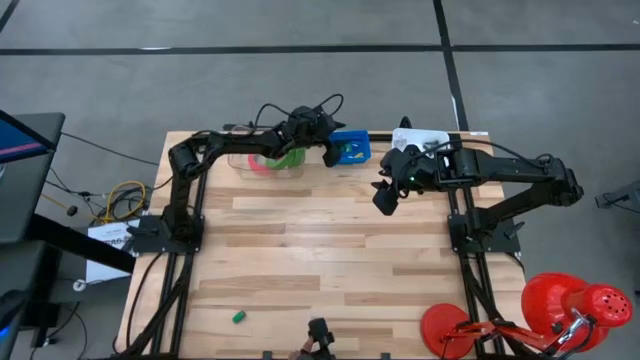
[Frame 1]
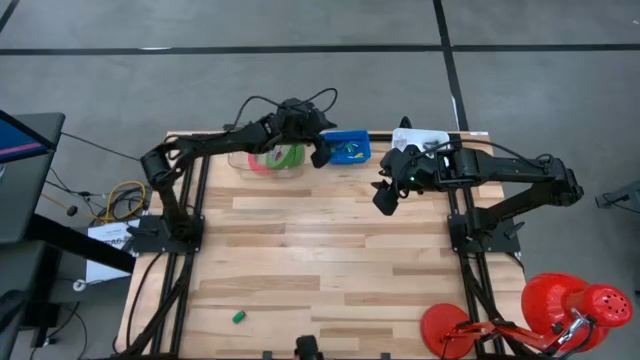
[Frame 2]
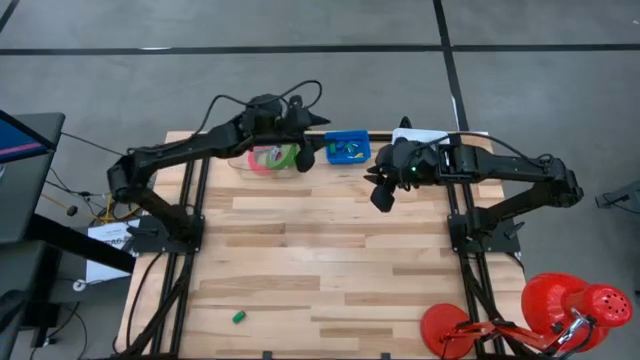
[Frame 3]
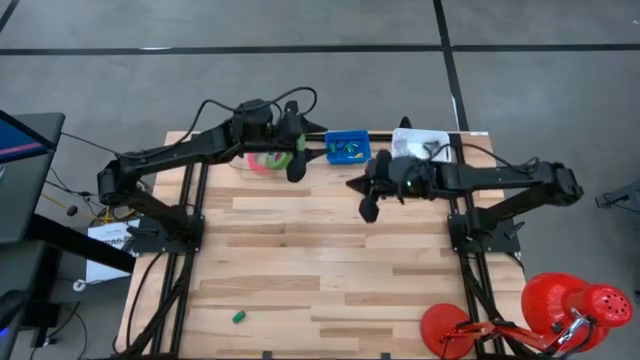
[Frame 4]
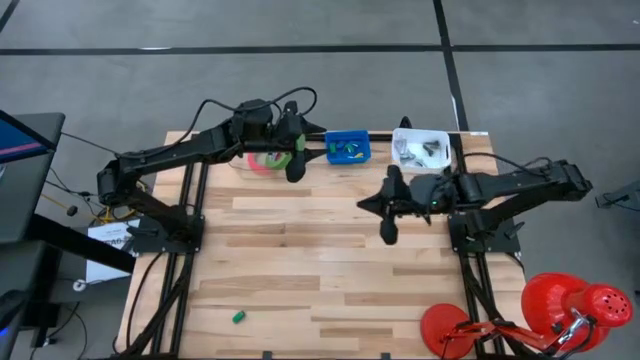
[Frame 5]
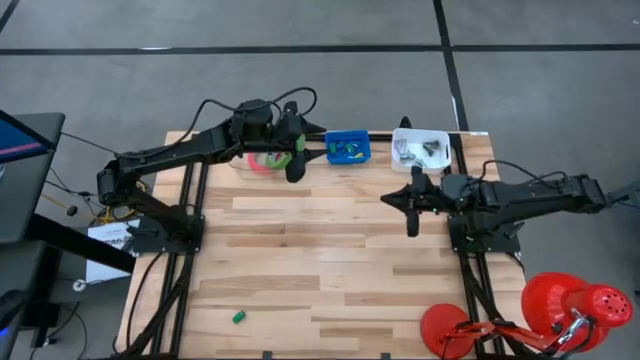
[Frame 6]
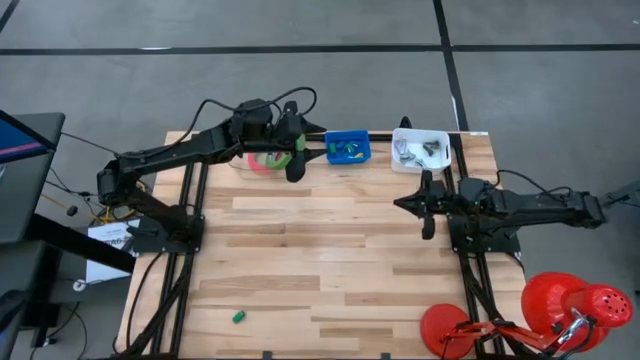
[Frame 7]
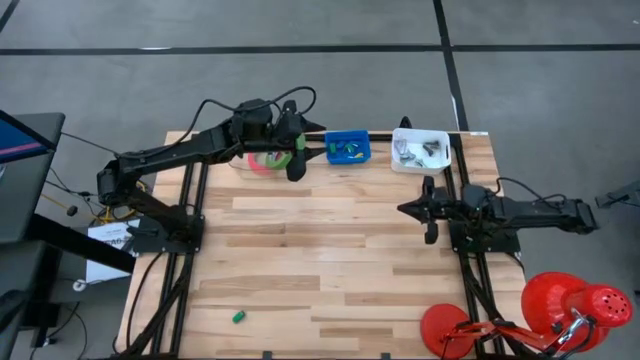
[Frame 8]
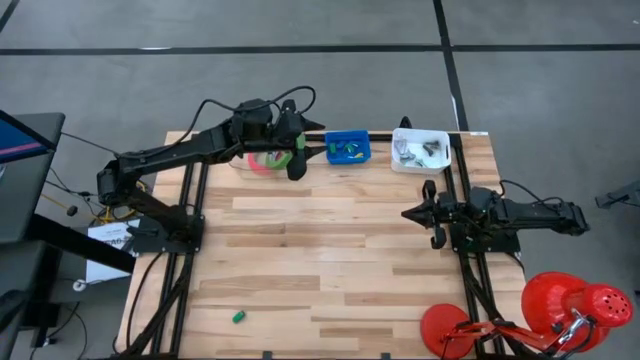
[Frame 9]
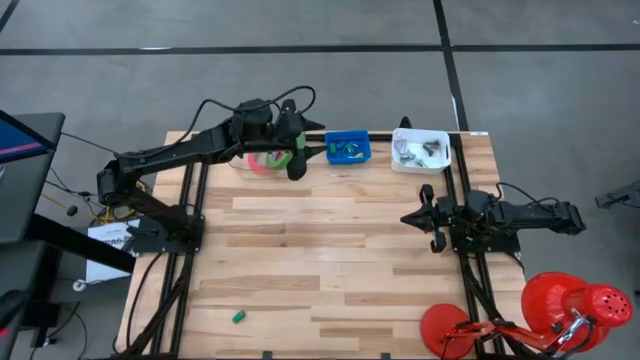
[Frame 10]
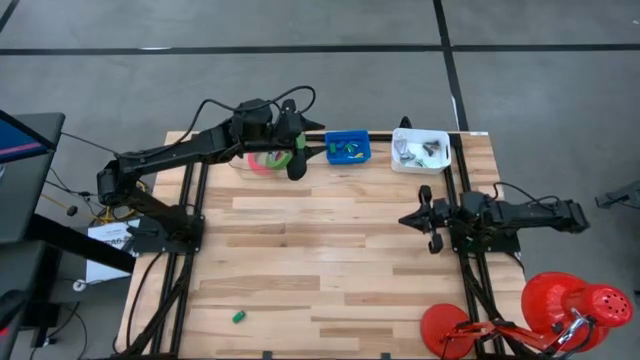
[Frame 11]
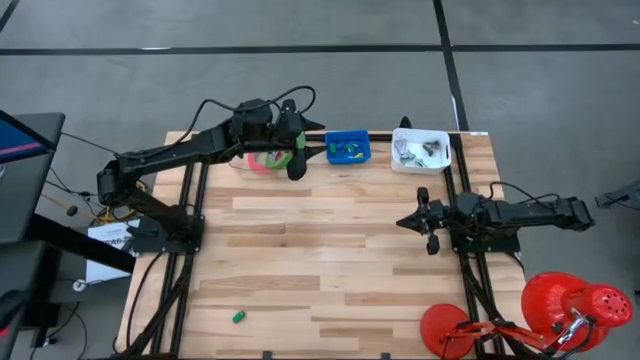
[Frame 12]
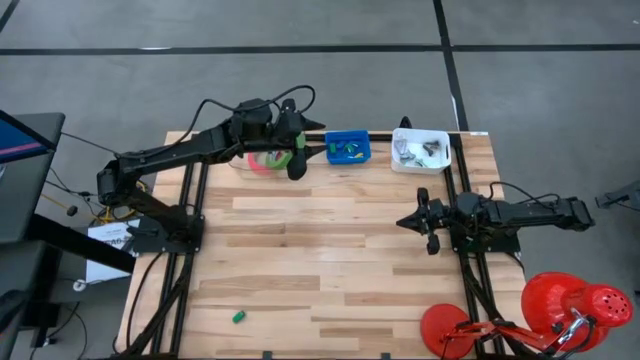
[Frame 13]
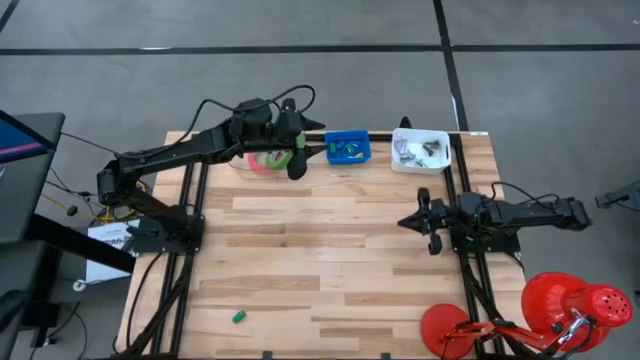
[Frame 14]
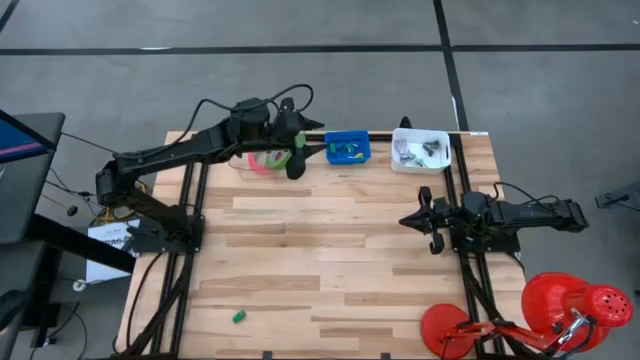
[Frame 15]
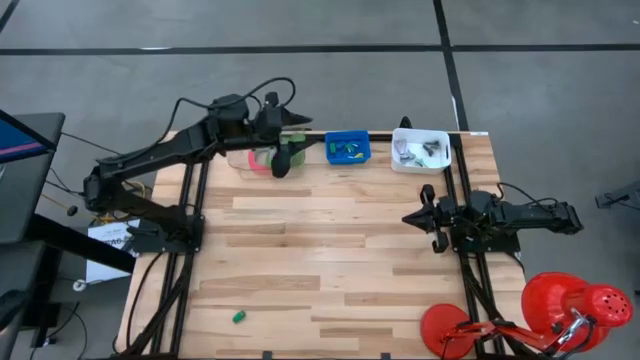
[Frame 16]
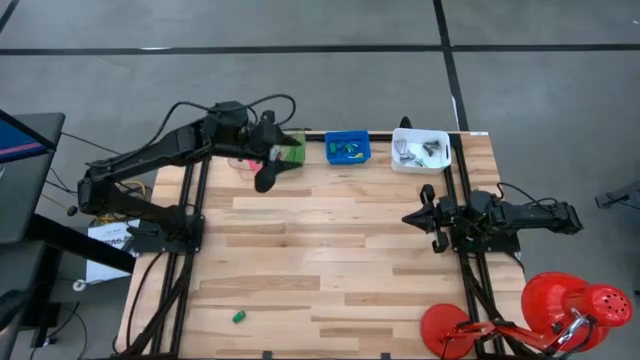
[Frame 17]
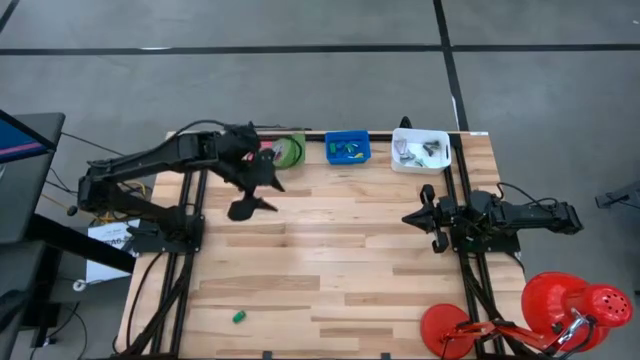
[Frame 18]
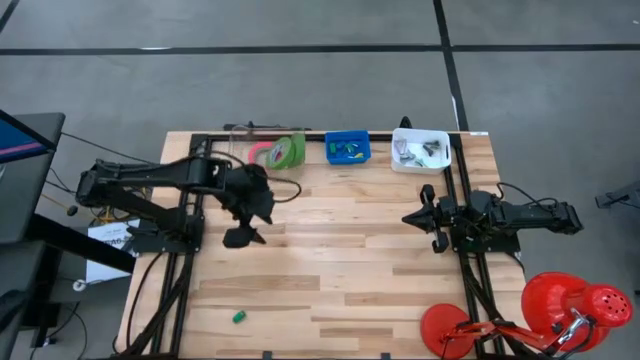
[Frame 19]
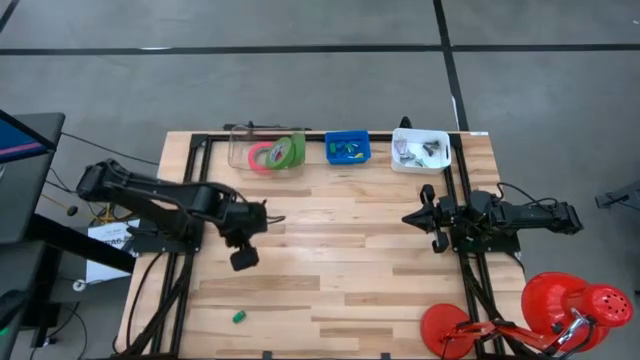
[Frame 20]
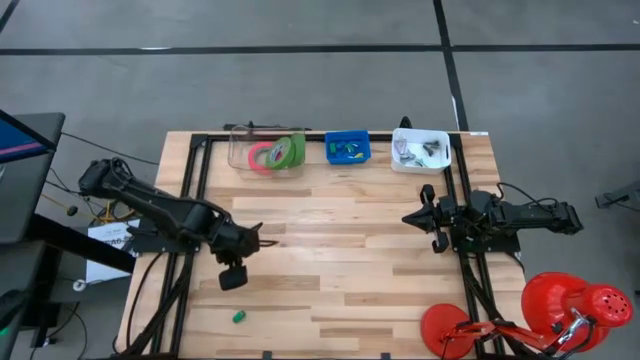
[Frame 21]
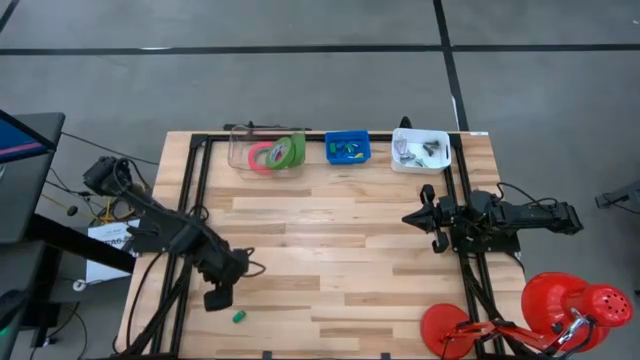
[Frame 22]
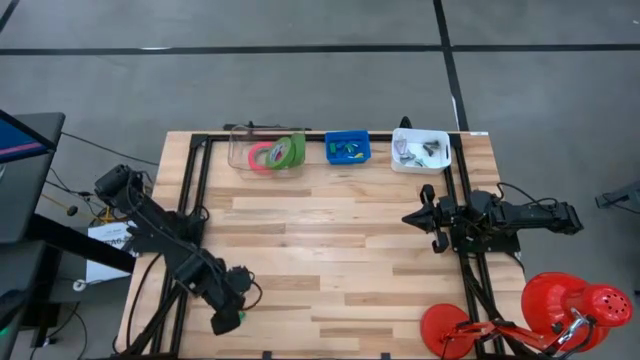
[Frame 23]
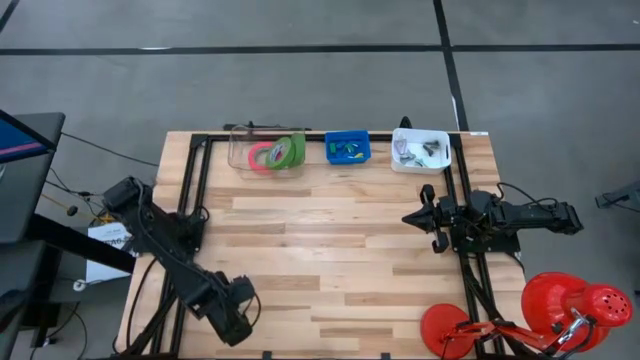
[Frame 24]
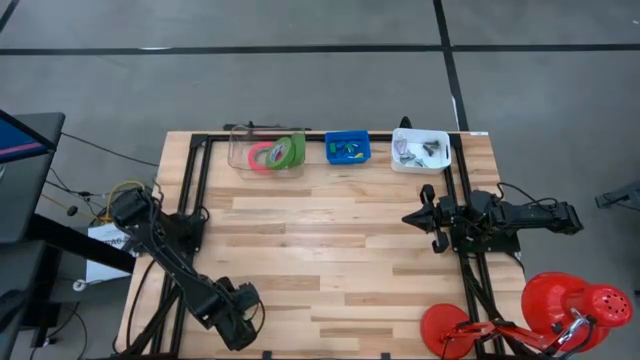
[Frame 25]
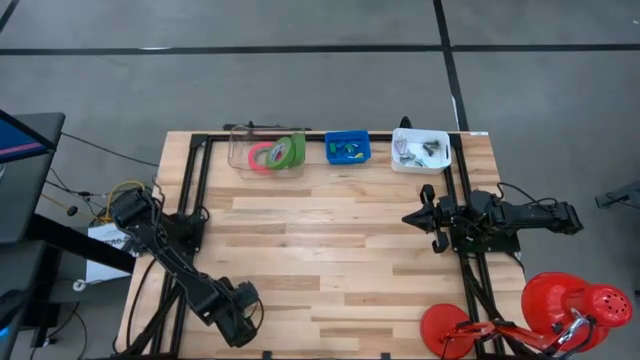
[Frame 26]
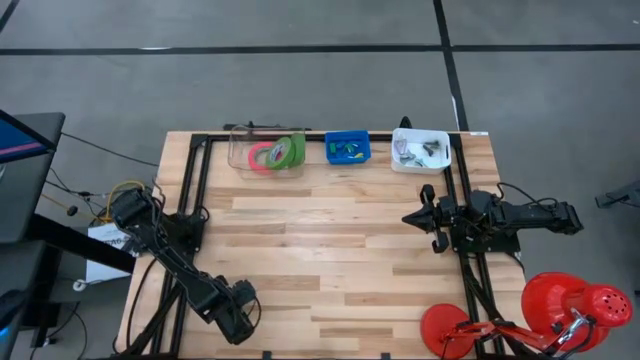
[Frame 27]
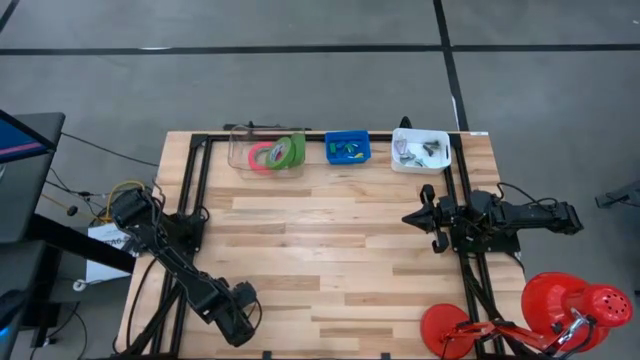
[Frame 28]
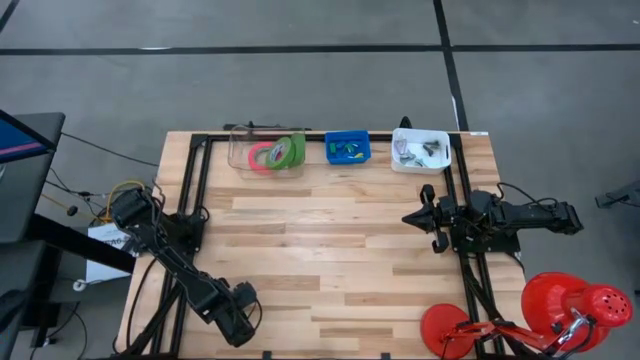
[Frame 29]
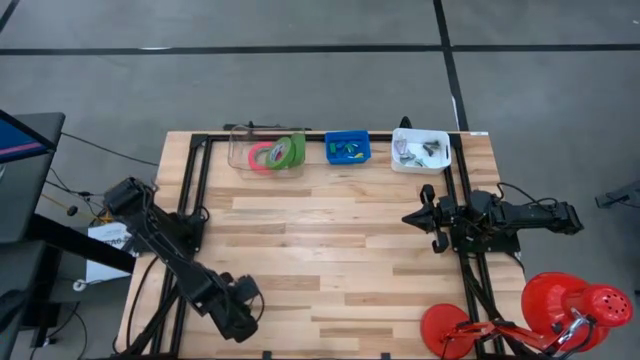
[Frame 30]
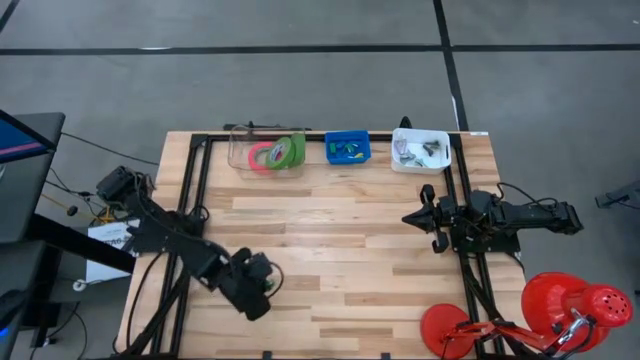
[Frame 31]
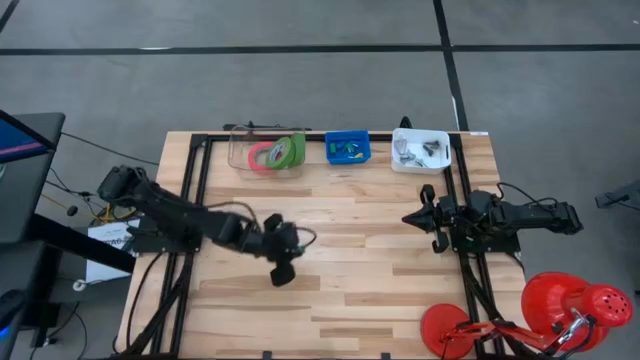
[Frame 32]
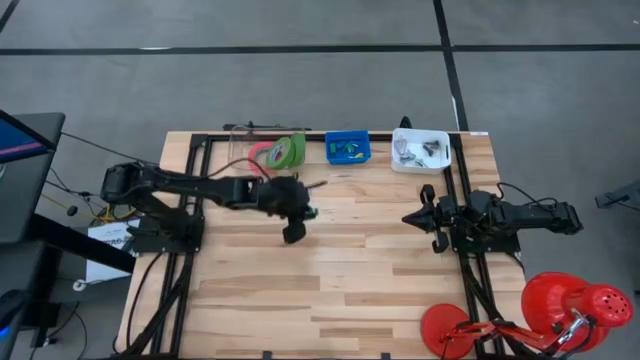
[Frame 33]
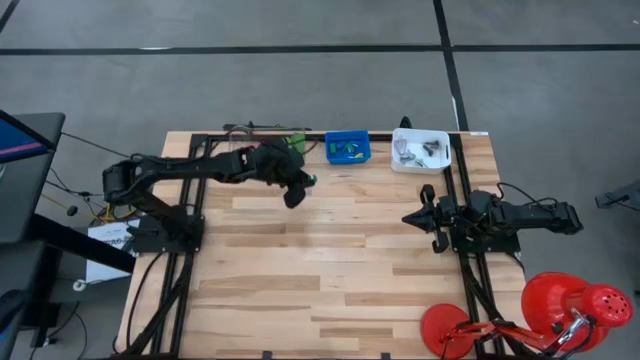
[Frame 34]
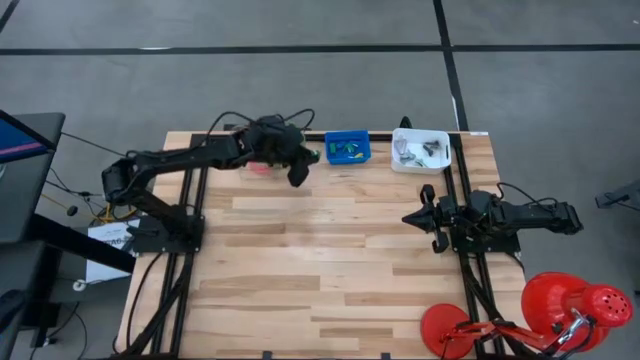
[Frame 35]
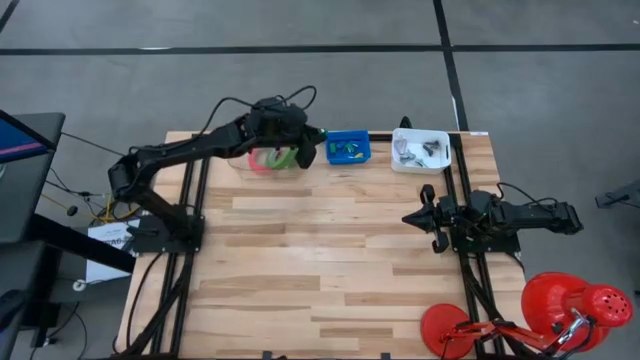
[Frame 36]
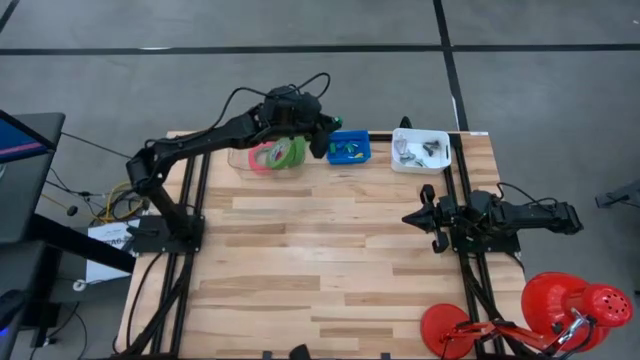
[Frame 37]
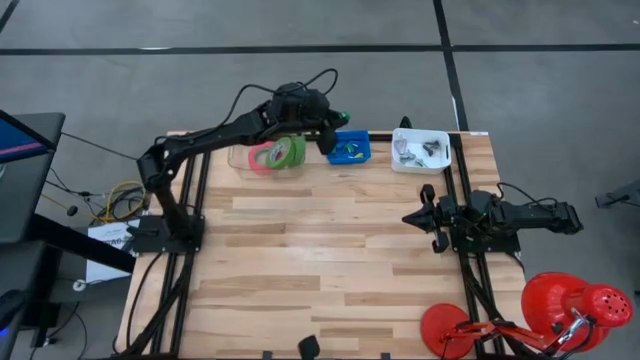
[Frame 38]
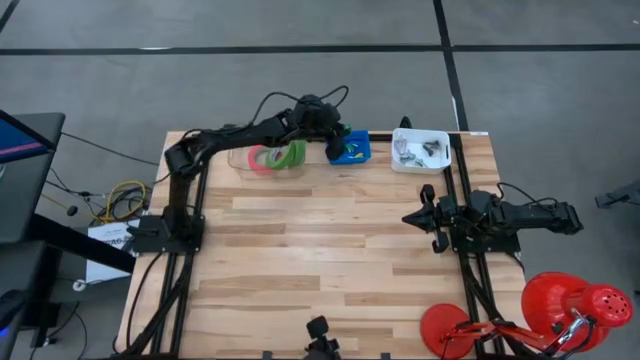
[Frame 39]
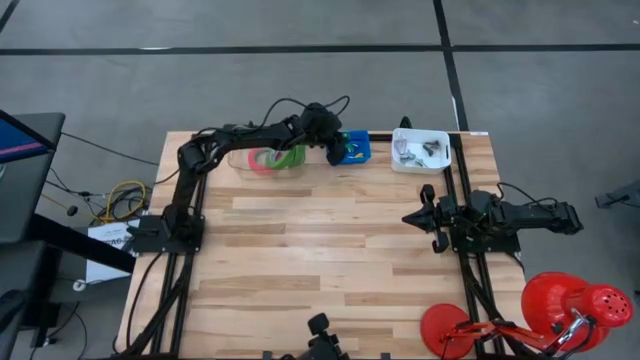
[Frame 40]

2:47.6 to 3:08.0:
Task: Pick and place Stapler, Stapler remover, tape
Put the green stapler into the blue bin

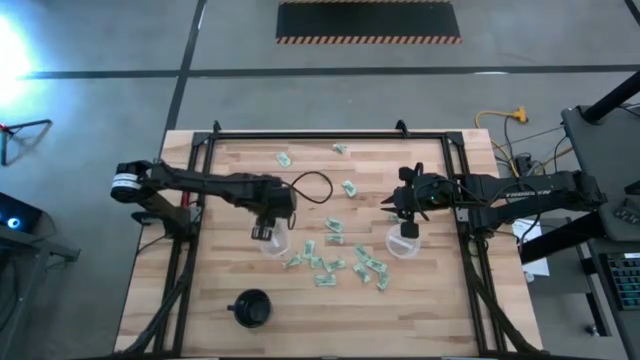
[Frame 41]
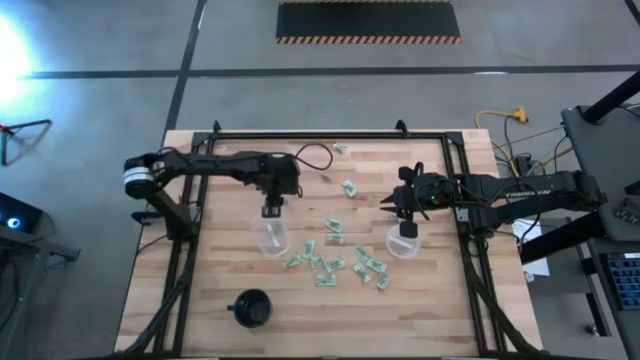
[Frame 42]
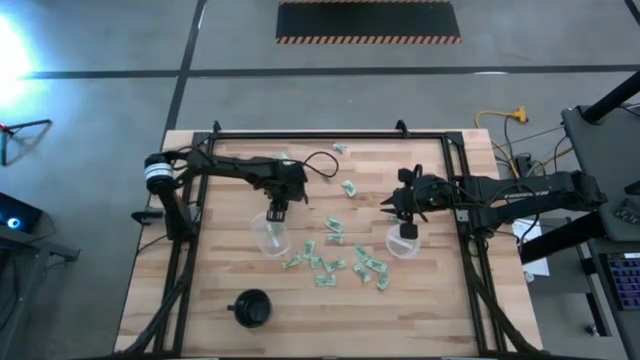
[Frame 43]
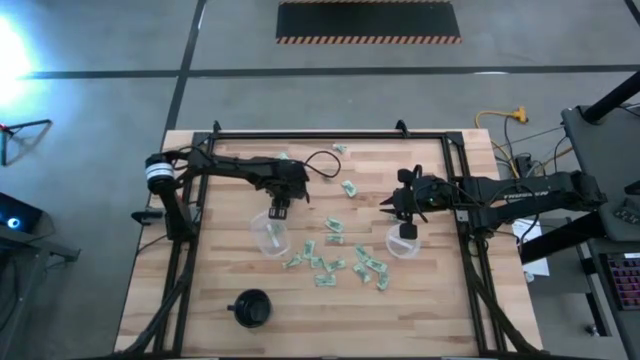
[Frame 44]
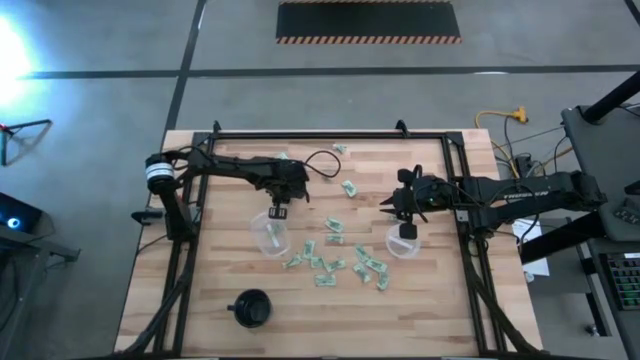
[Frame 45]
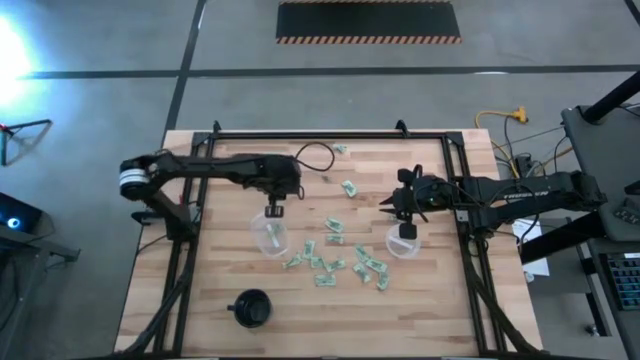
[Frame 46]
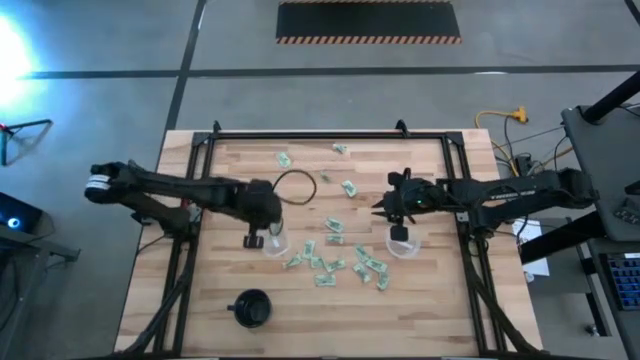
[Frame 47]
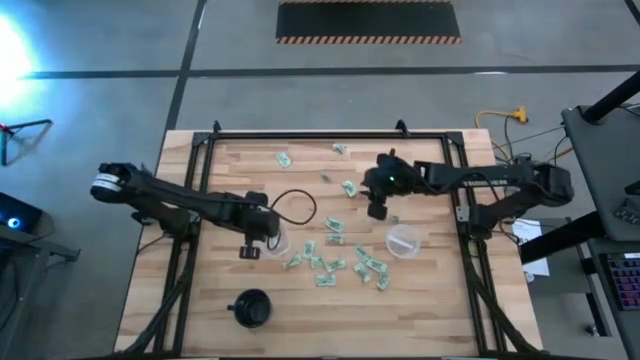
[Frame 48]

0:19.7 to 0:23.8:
Task: Pick and place Stevia / Truvia into bins
Put the stevia packet into the oval transparent container
